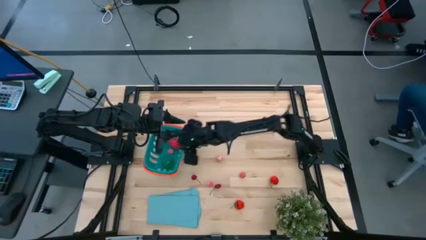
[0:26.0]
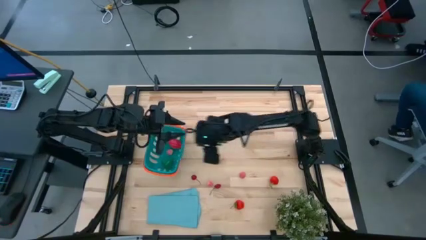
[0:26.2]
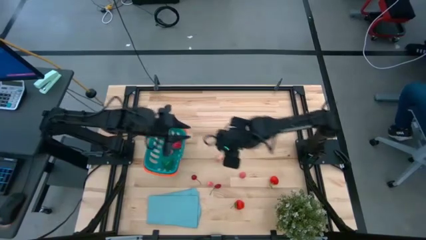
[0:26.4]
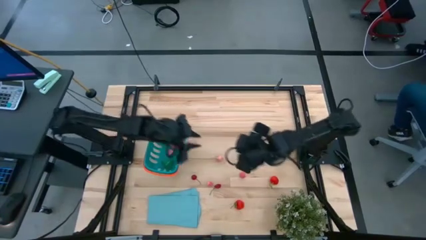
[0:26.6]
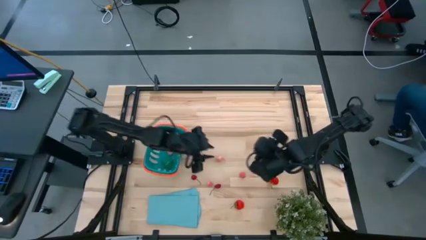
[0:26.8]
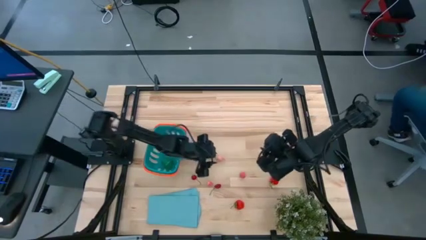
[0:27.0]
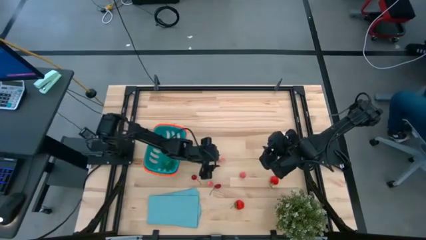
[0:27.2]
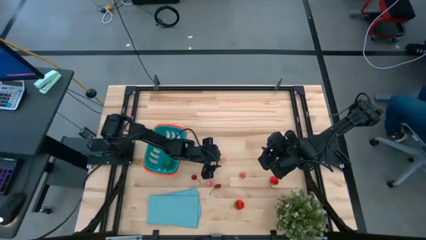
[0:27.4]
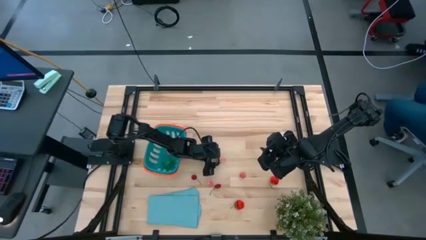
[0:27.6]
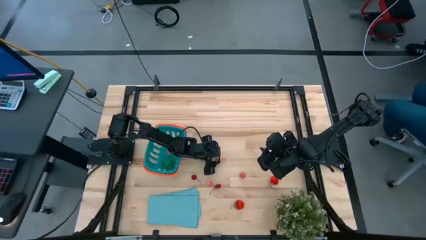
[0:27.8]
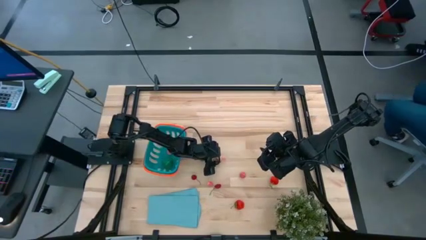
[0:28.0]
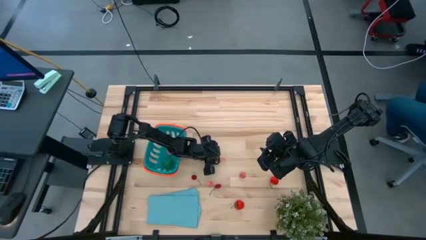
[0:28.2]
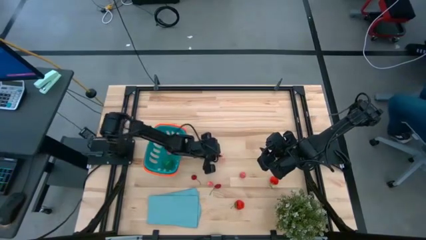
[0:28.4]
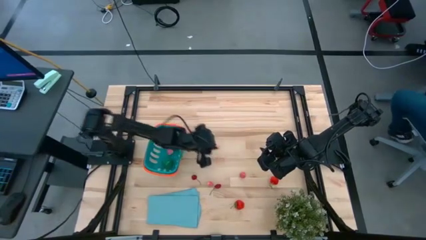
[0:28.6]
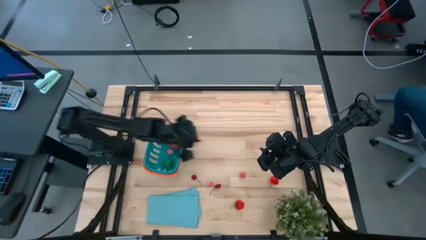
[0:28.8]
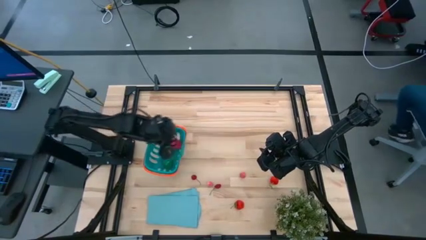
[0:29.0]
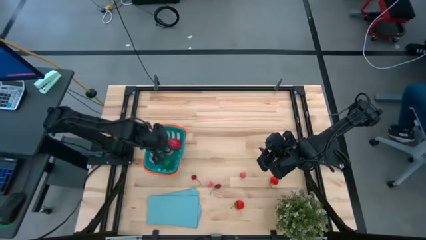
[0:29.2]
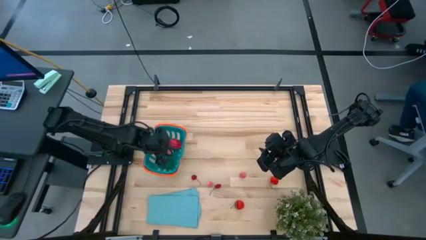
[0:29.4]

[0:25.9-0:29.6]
Task: Pick and placing Produce into tupperware
Put the pink apricot into the blue basket

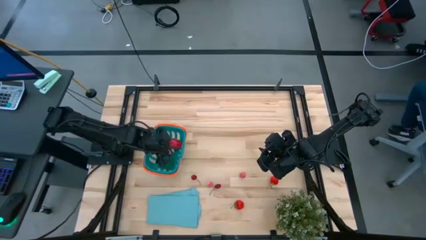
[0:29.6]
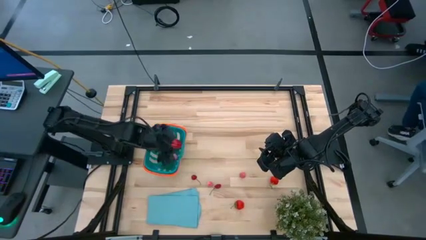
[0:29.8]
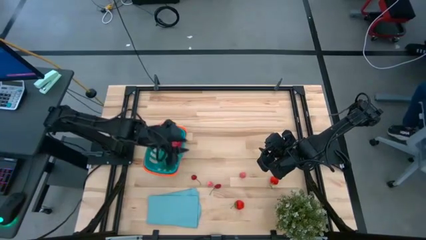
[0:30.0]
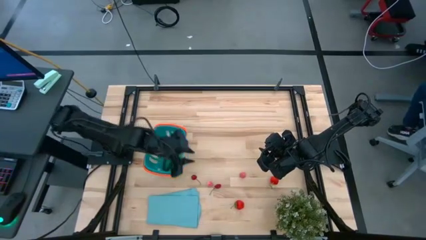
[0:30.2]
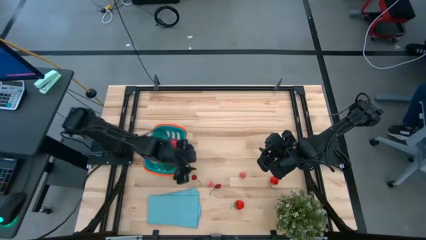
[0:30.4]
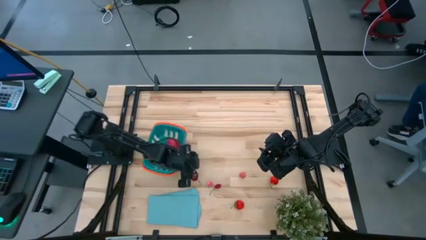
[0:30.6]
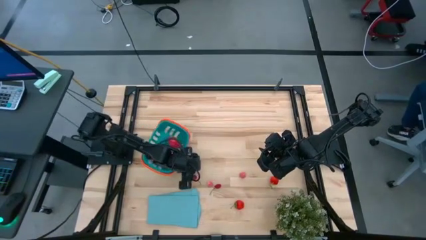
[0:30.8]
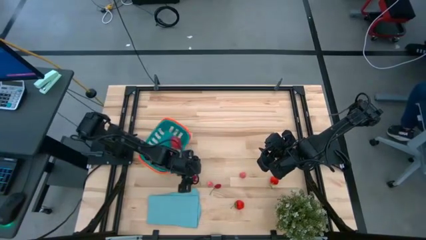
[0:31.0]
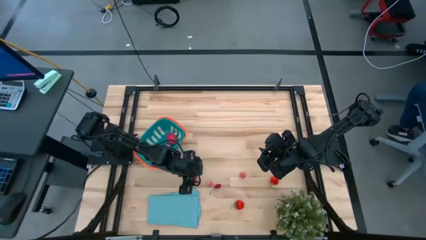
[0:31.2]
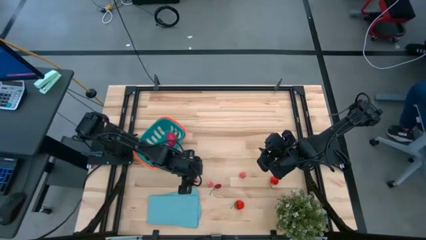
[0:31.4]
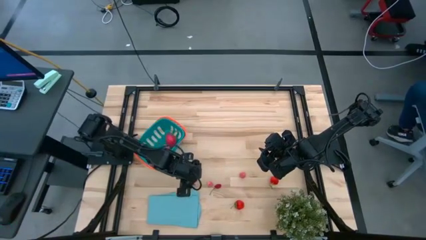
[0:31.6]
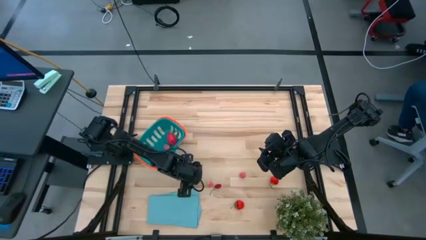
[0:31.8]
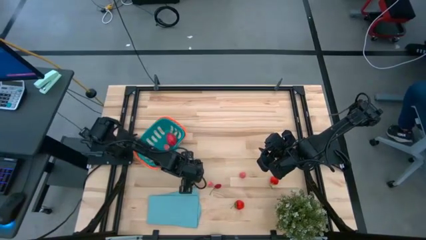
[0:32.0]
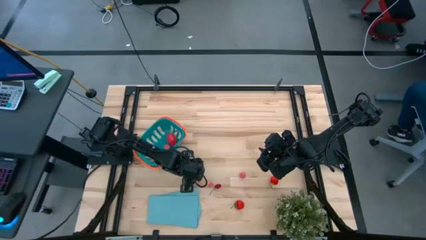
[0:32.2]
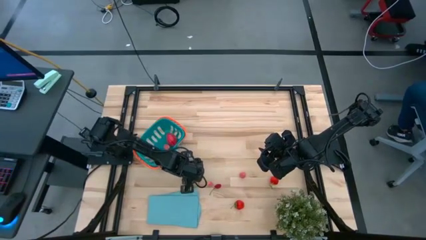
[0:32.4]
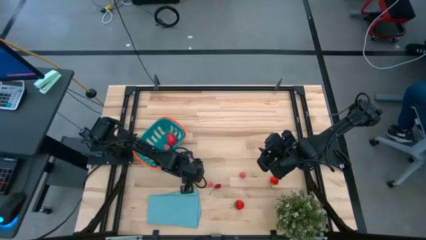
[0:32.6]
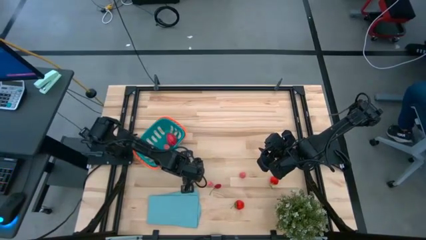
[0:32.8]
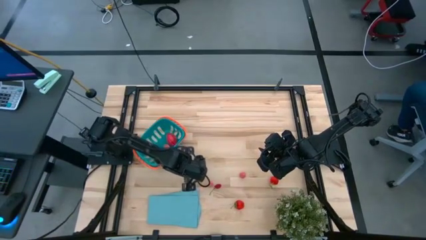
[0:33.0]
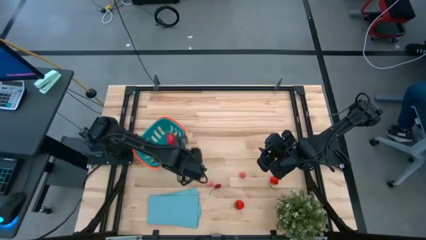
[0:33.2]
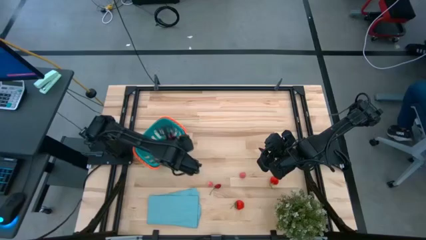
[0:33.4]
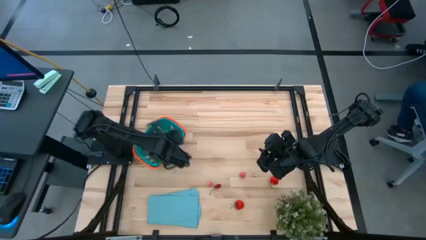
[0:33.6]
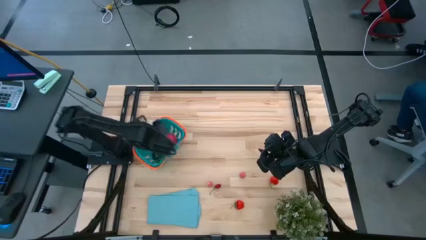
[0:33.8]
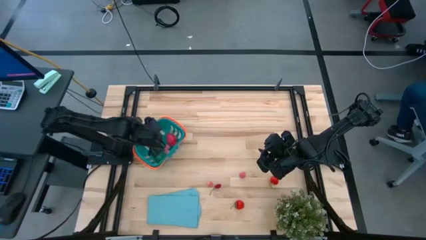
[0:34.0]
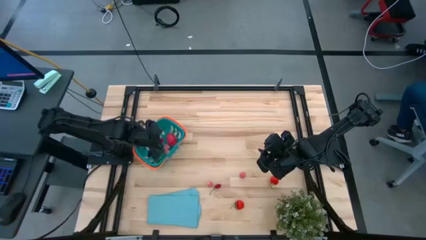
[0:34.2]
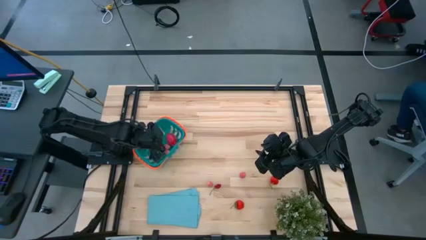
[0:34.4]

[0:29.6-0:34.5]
Put the red cherry into the blue basket

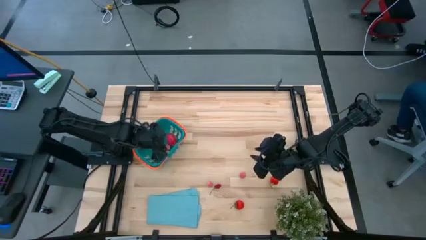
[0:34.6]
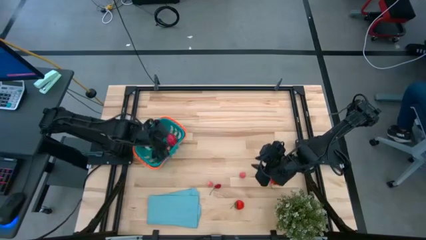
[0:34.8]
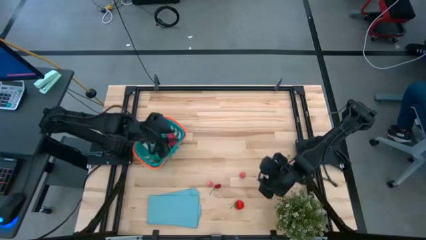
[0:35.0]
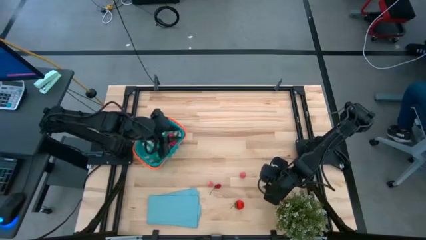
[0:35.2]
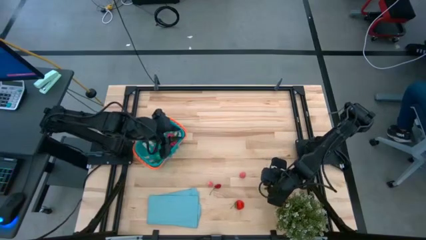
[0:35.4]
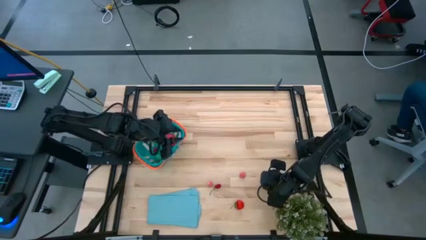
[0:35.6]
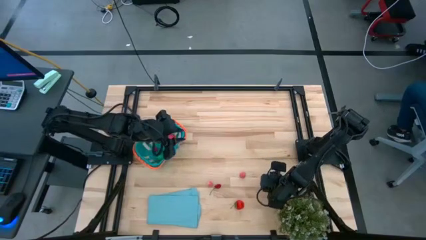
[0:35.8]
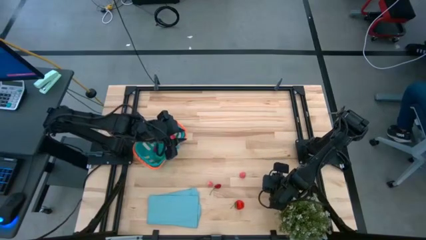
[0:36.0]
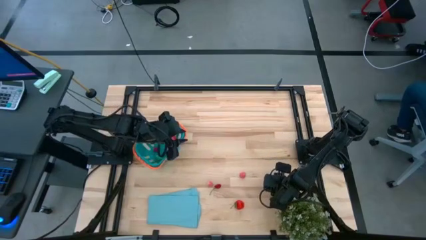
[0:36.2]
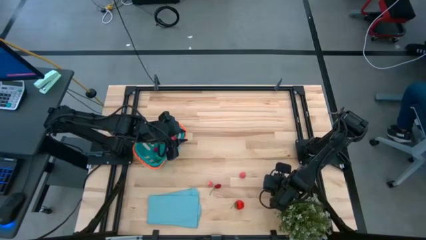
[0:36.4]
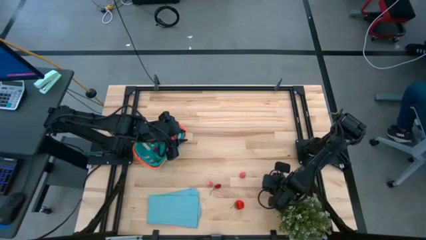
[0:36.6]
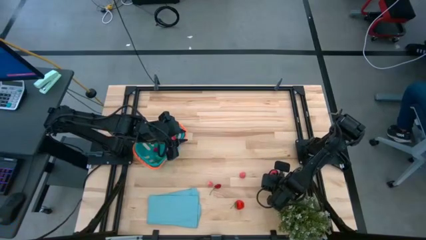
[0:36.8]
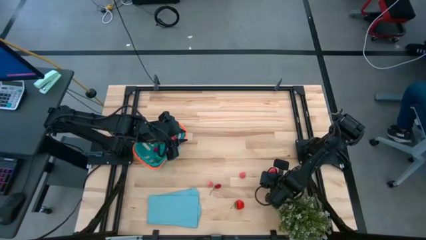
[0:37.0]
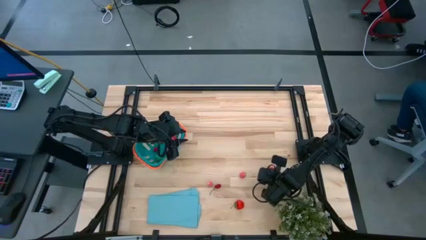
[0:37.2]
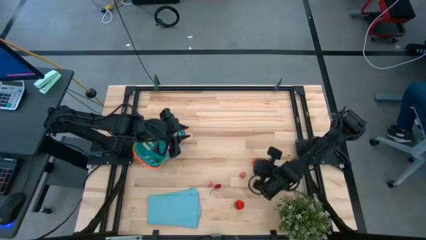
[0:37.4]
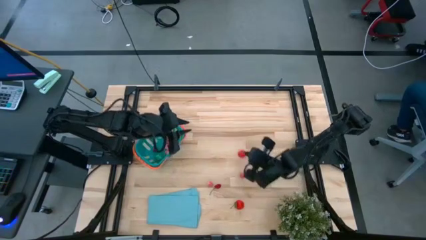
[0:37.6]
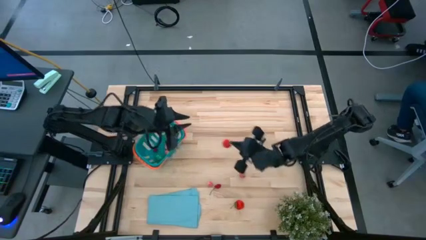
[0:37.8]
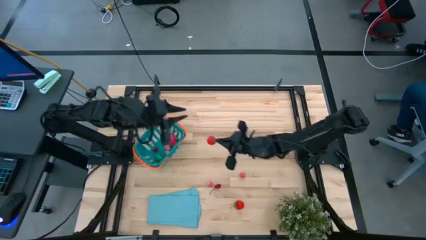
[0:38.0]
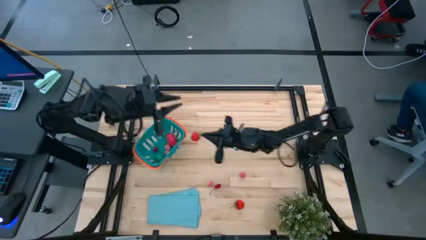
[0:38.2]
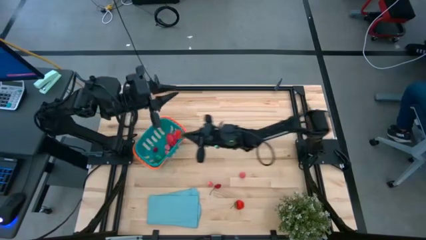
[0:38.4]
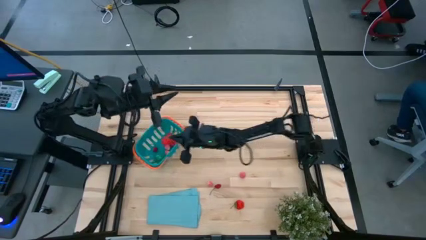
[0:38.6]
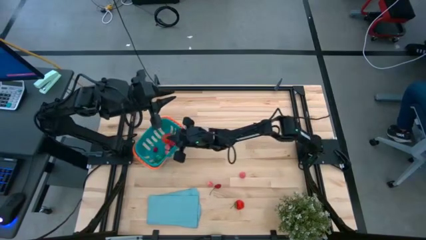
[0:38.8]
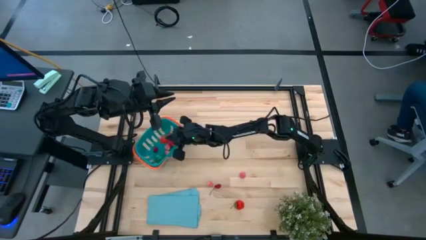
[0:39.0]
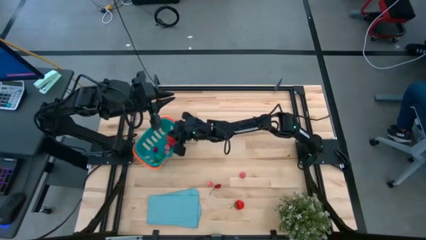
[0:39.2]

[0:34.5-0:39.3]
Put the red strawberry into the blue basket

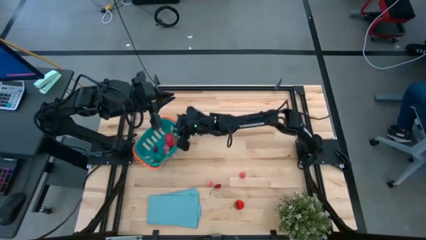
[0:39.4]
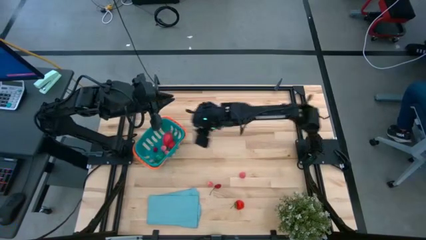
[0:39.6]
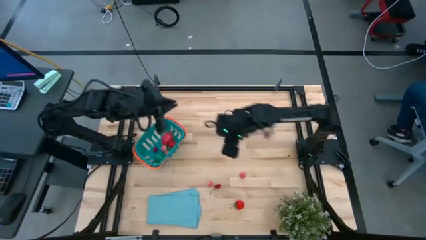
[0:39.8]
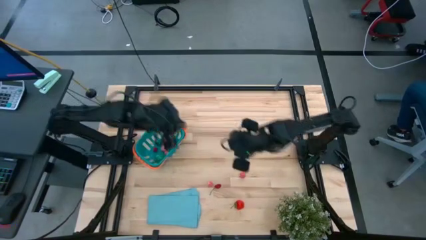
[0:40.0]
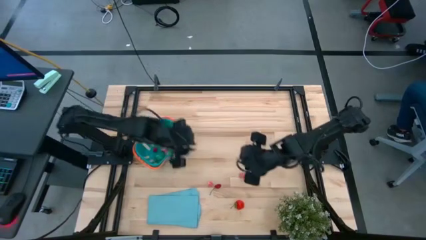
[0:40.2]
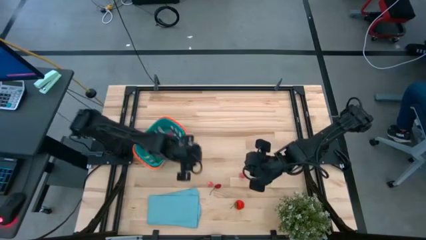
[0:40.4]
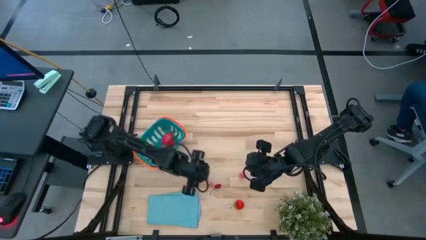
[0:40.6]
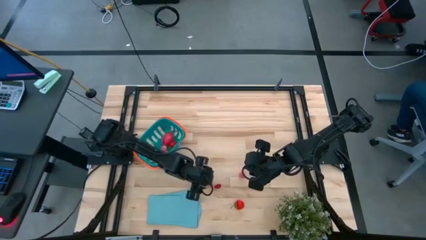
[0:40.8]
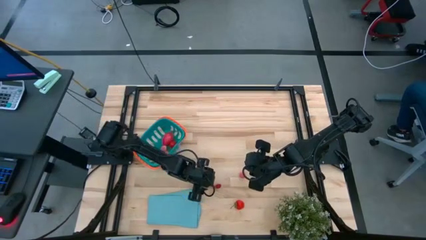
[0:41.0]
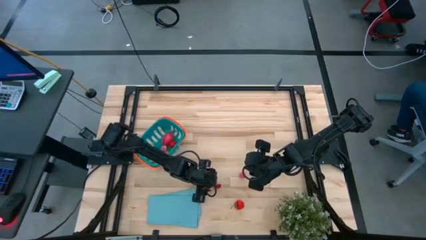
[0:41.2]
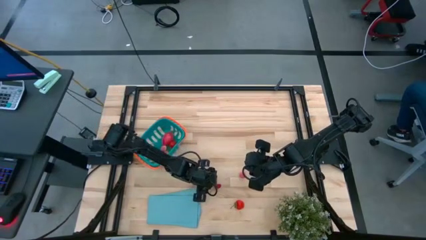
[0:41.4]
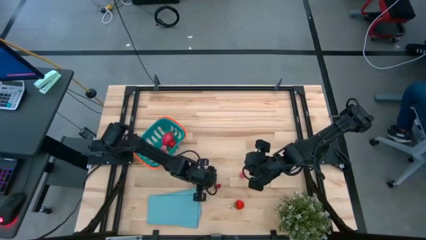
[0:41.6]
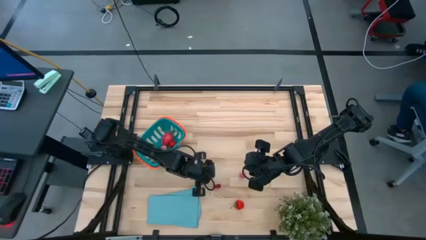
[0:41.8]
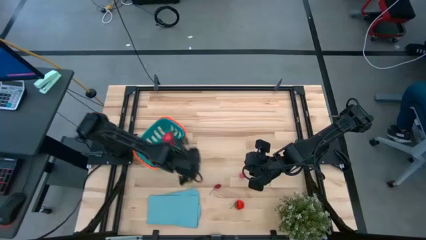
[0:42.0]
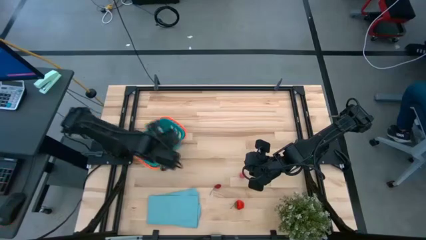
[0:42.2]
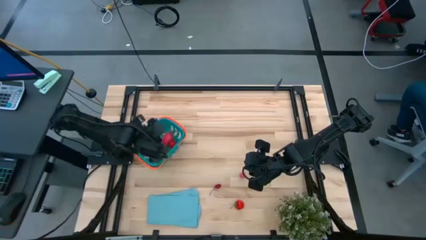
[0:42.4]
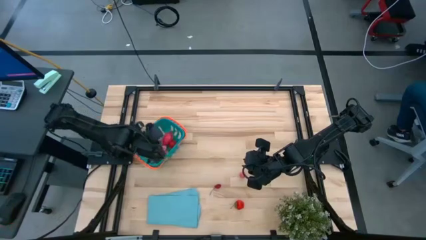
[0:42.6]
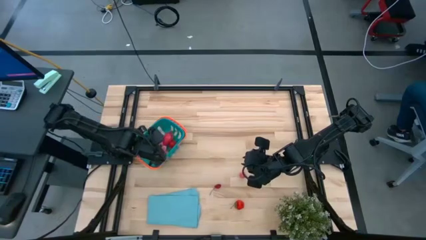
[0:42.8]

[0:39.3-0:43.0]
Put the pink apricot into the blue basket
